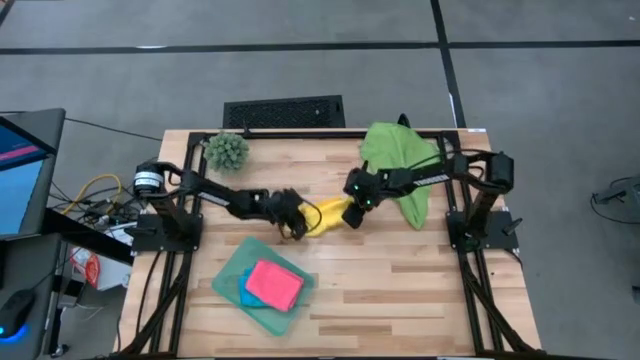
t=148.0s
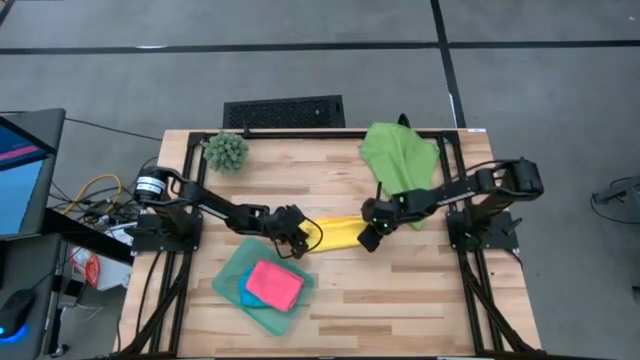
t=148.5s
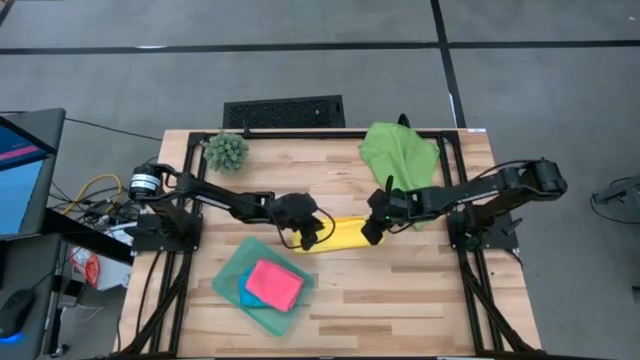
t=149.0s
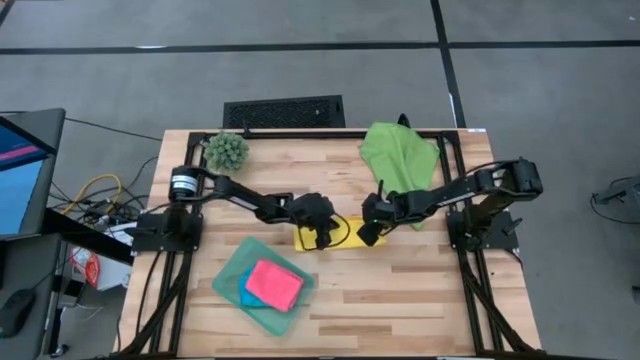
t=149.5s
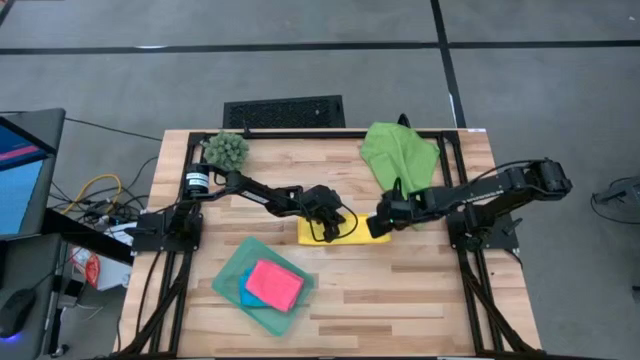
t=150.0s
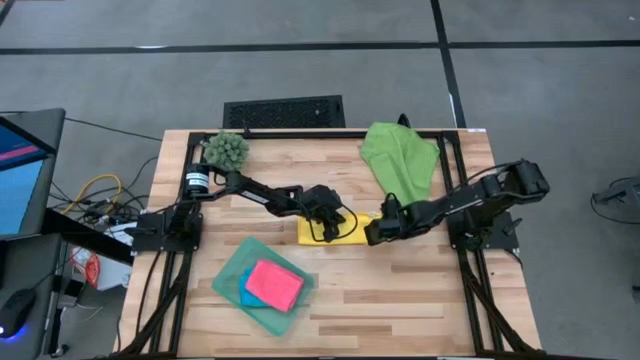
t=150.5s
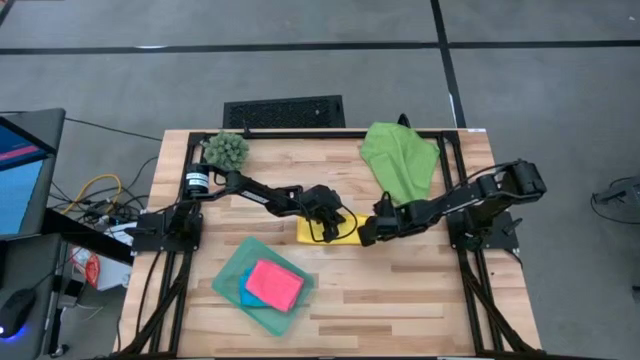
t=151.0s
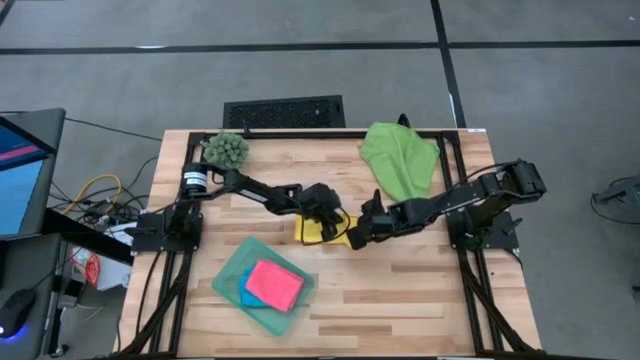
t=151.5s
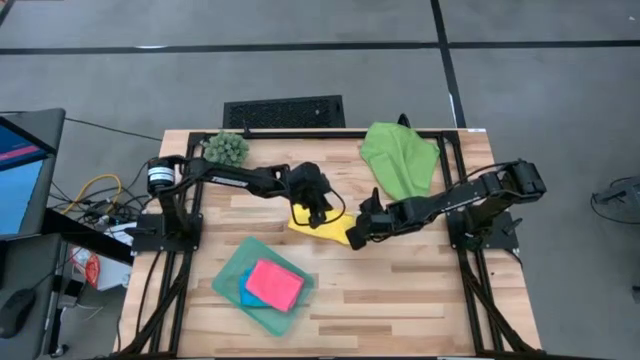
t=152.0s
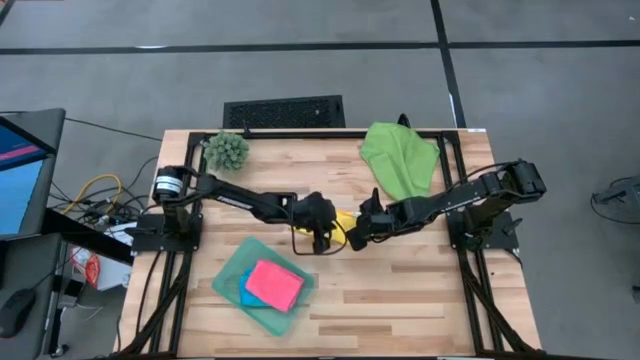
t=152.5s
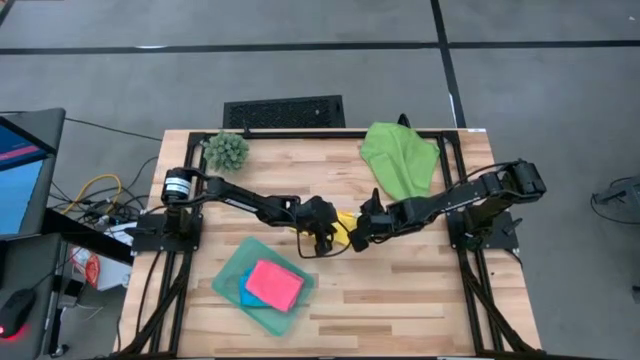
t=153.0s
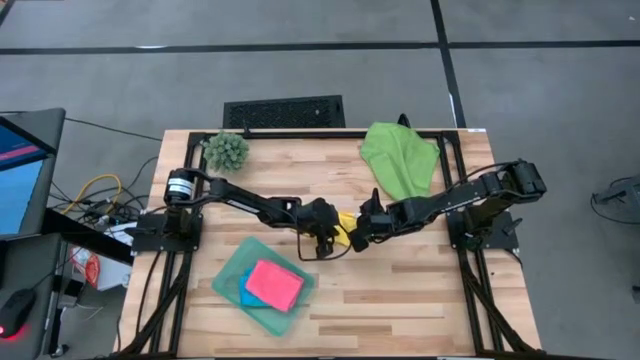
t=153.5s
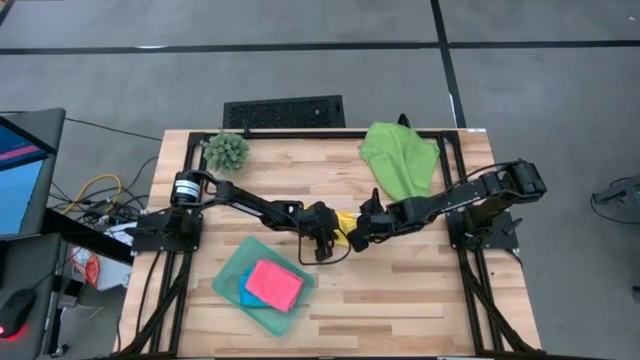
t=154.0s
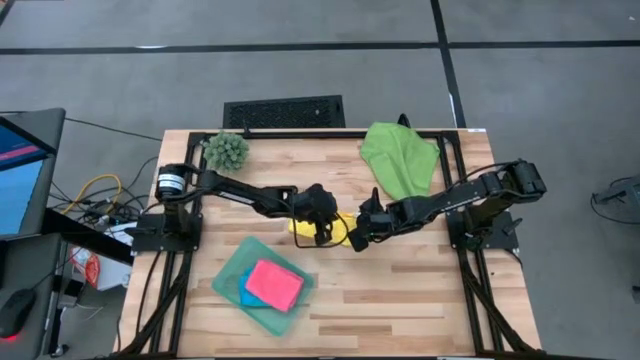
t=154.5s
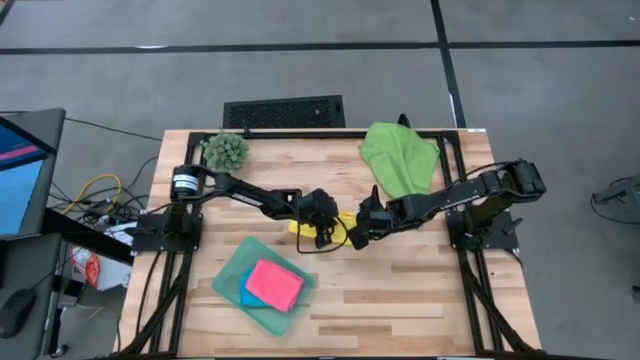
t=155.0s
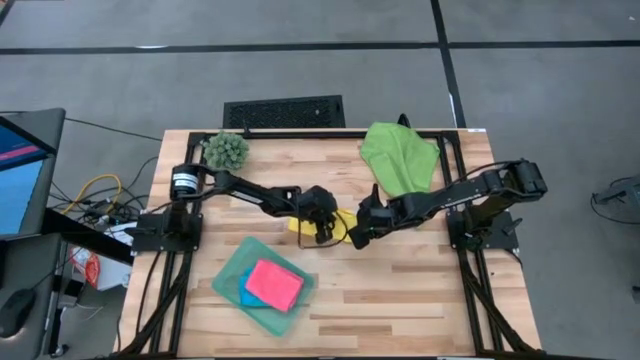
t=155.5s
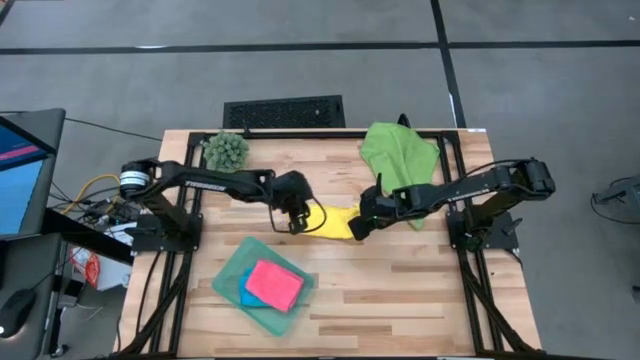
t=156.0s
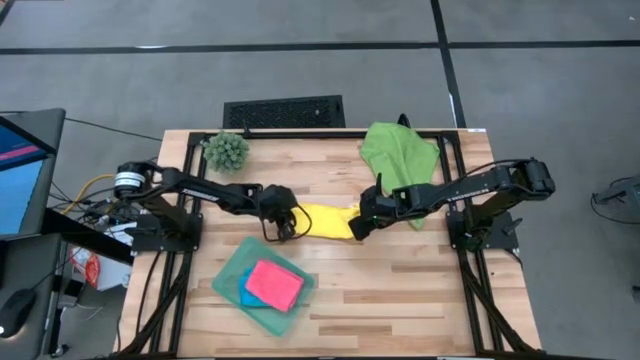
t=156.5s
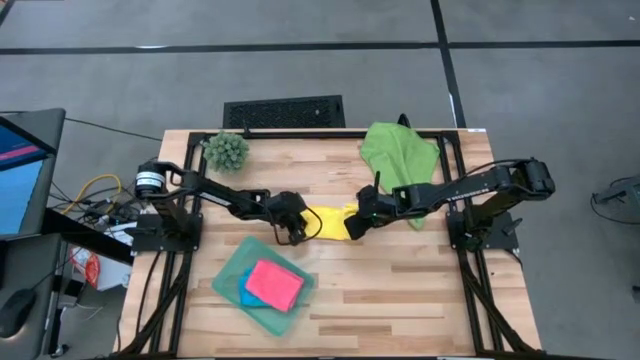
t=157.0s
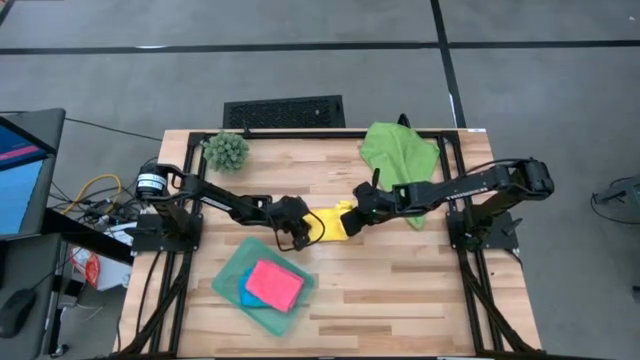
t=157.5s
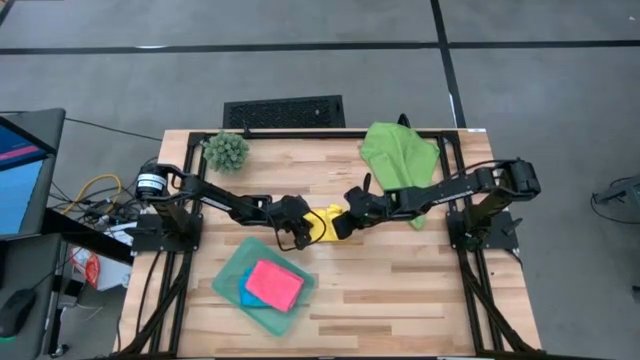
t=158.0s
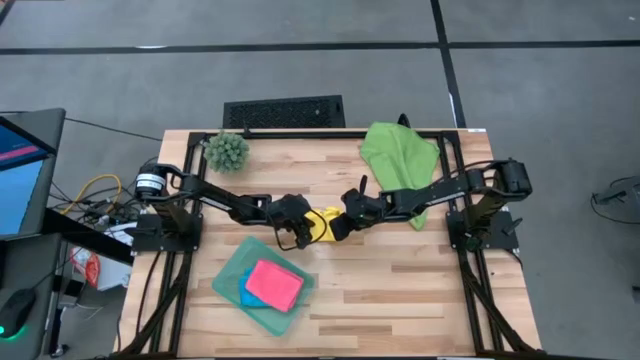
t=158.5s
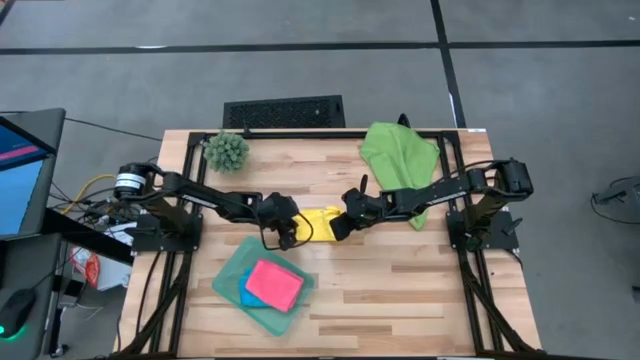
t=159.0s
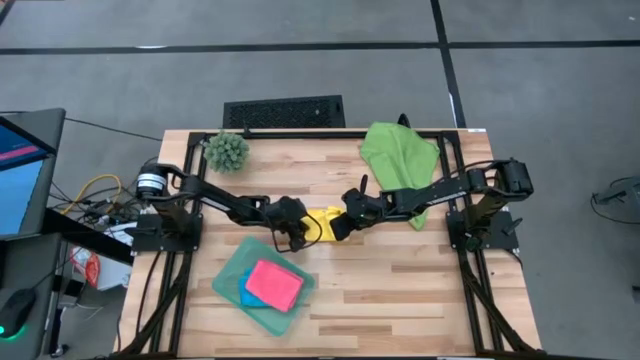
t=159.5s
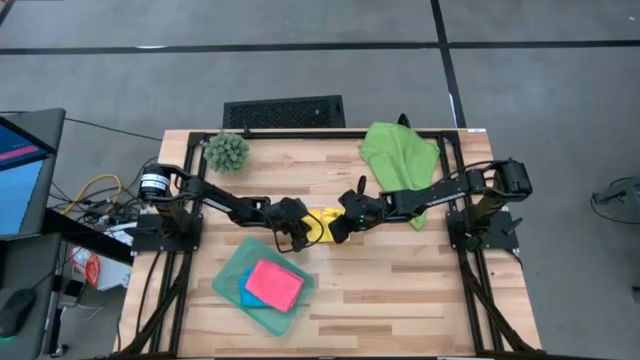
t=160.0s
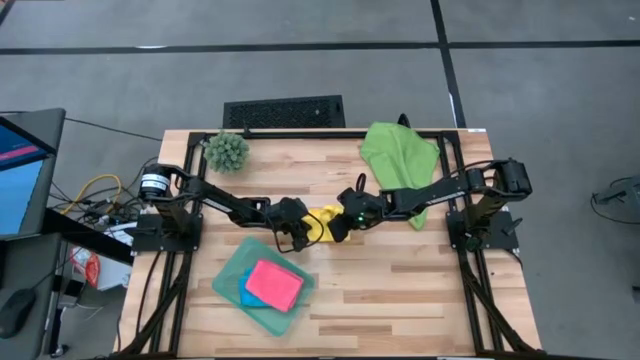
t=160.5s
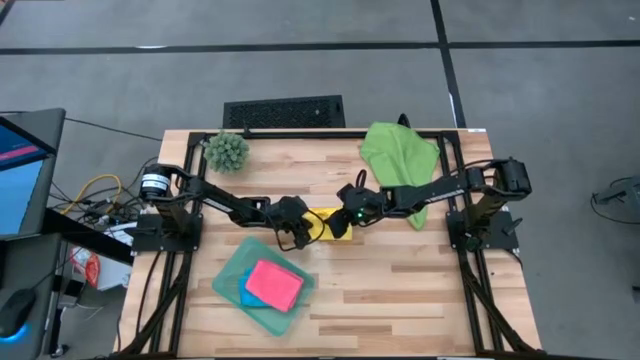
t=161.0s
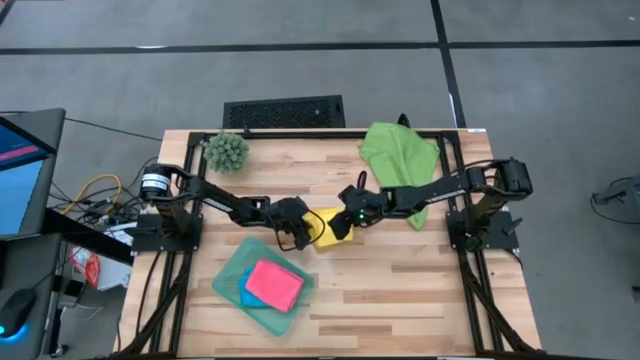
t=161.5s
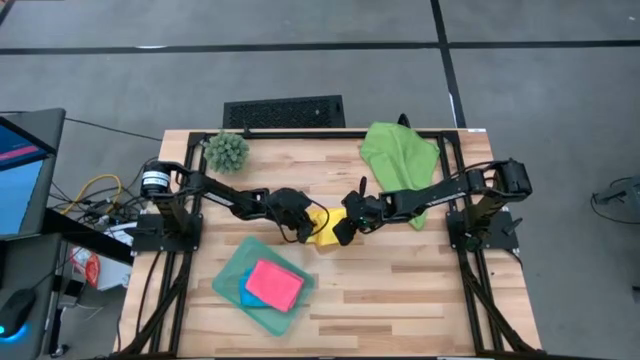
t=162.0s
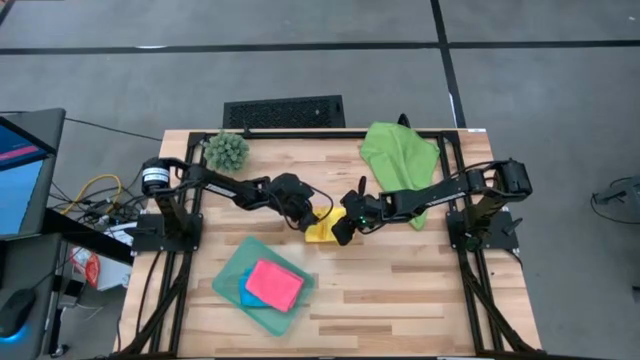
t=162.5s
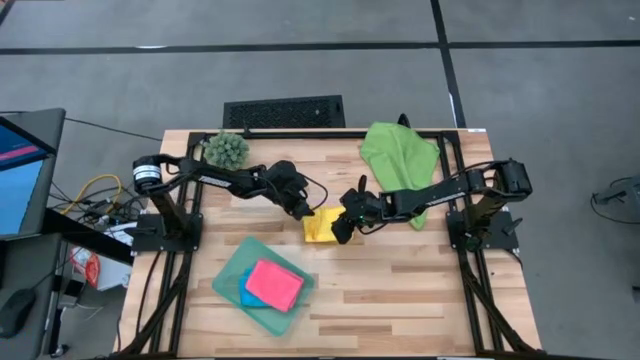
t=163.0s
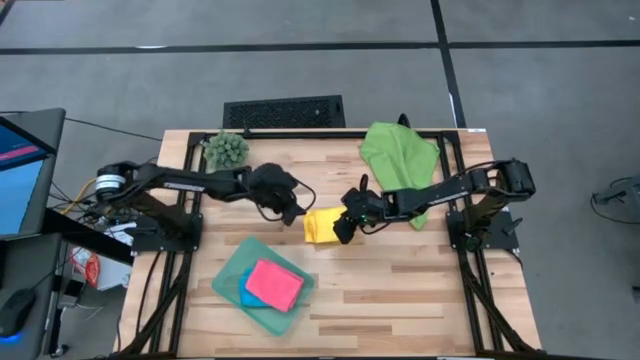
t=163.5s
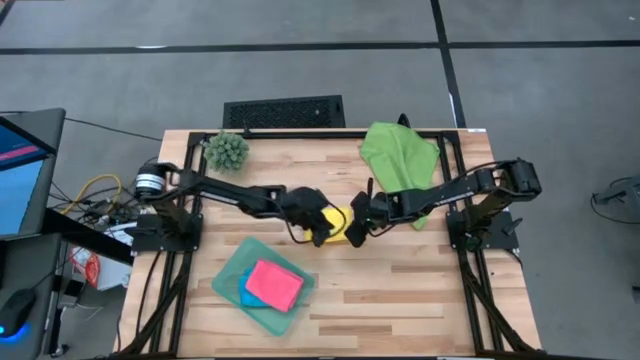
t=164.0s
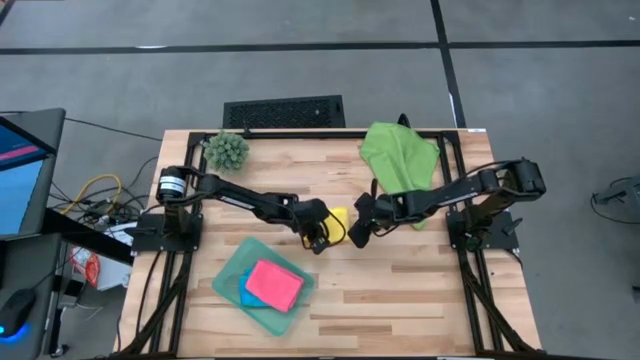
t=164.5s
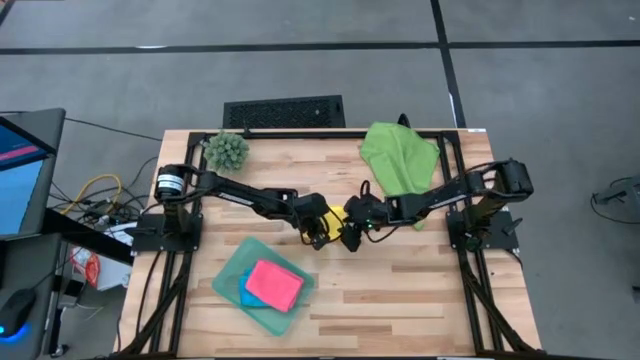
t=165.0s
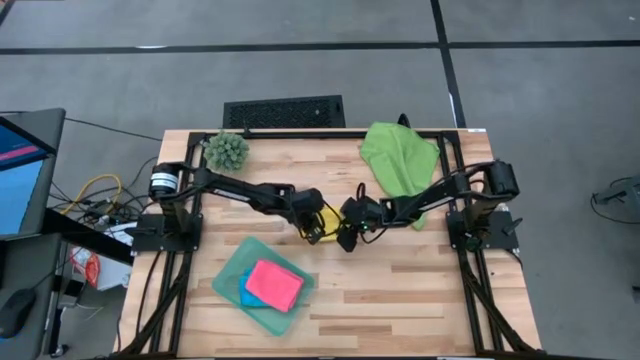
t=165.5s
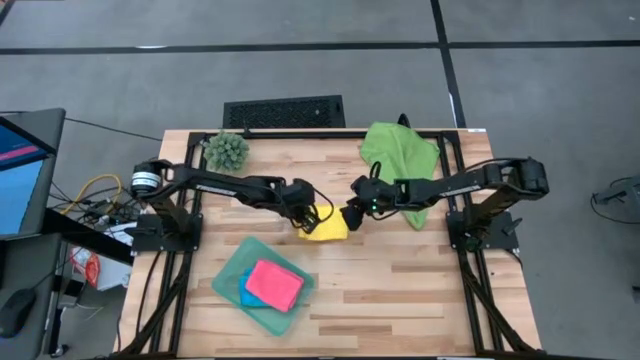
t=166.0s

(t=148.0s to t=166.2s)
Task: Fold microfiber towels
Fold the yellow microfiber towel
